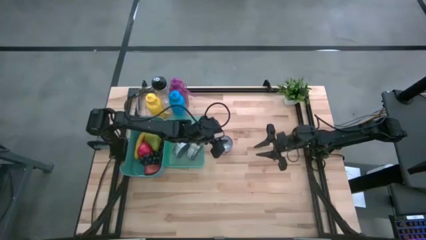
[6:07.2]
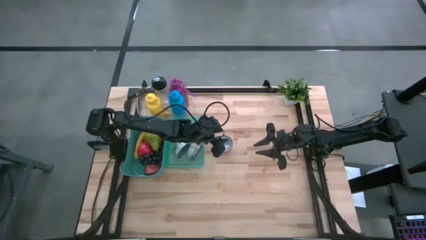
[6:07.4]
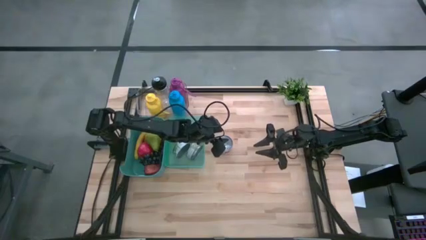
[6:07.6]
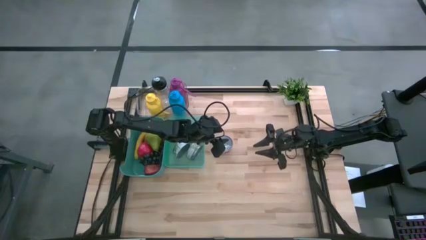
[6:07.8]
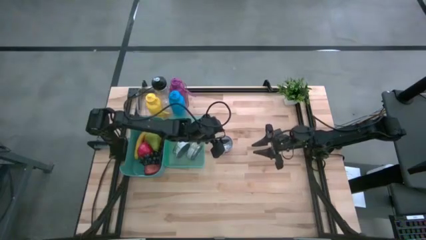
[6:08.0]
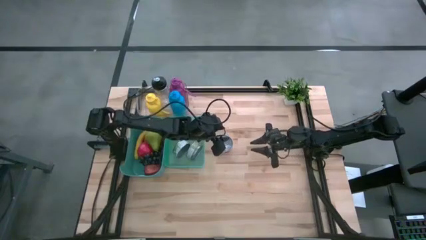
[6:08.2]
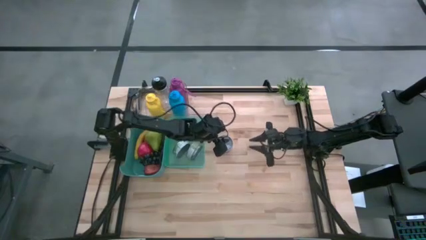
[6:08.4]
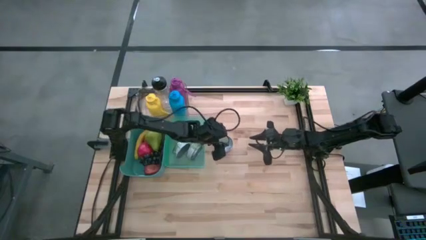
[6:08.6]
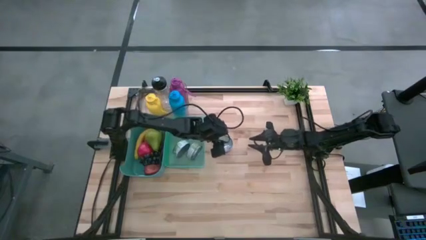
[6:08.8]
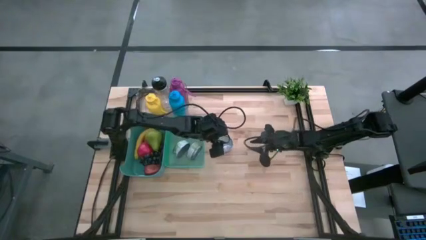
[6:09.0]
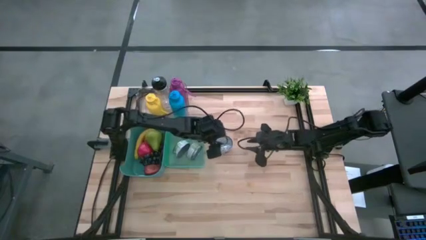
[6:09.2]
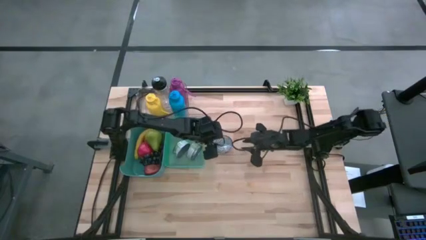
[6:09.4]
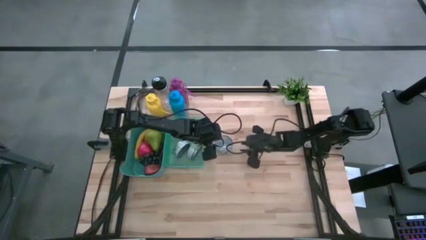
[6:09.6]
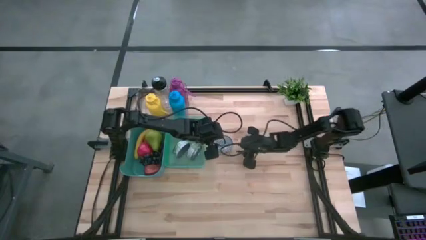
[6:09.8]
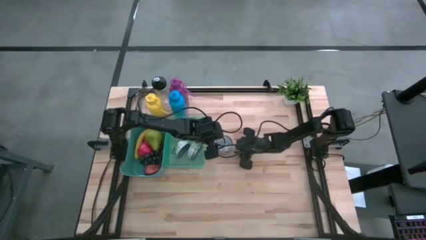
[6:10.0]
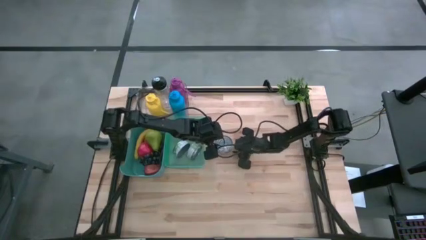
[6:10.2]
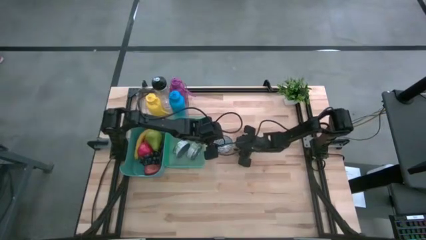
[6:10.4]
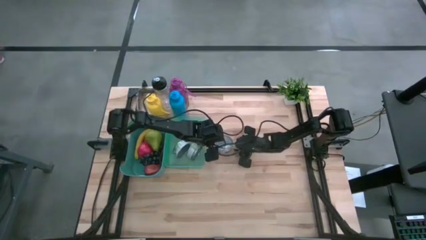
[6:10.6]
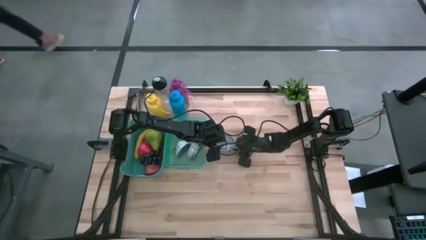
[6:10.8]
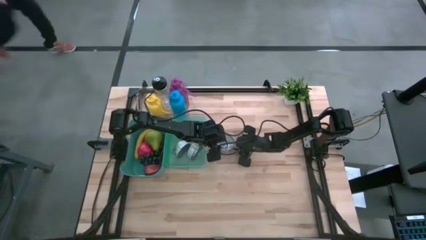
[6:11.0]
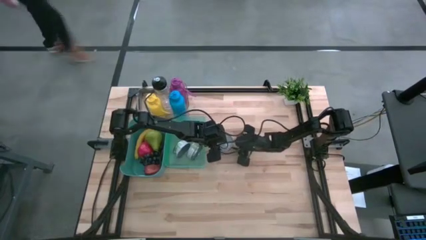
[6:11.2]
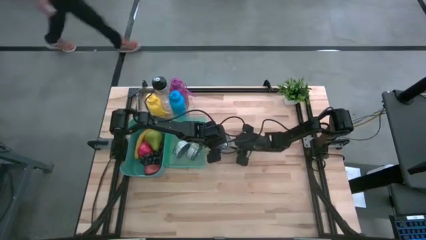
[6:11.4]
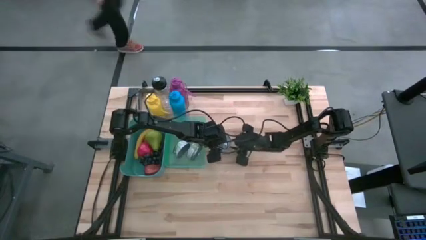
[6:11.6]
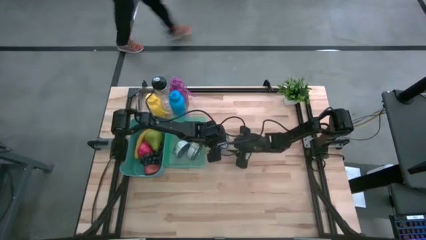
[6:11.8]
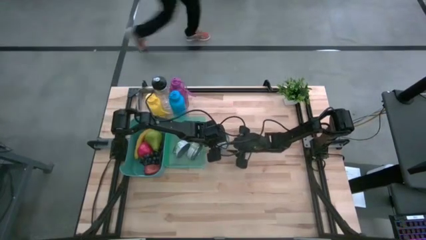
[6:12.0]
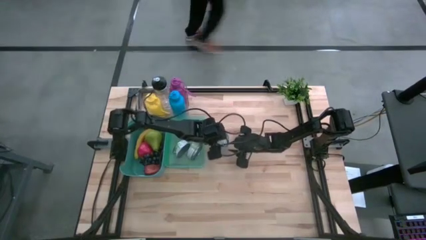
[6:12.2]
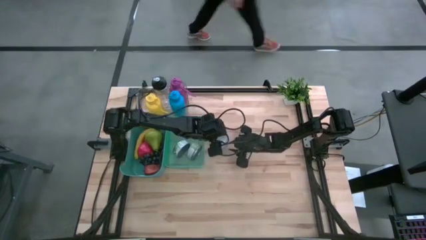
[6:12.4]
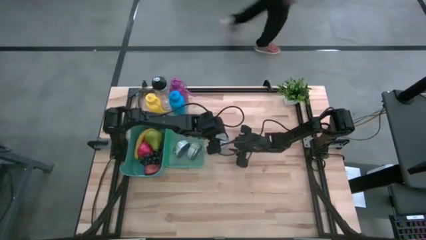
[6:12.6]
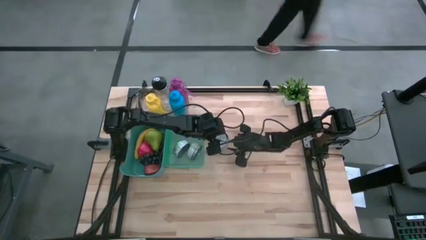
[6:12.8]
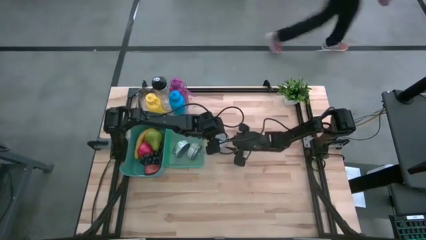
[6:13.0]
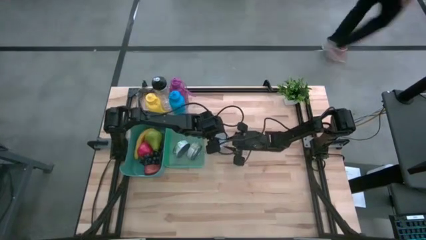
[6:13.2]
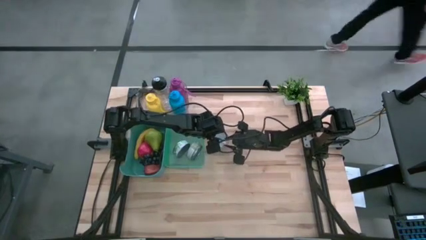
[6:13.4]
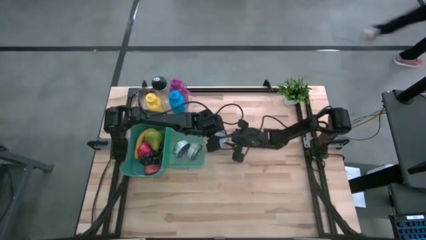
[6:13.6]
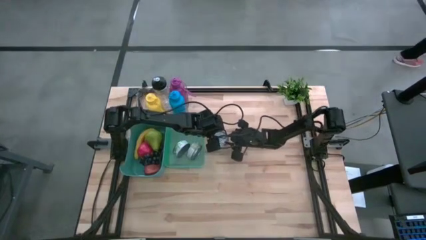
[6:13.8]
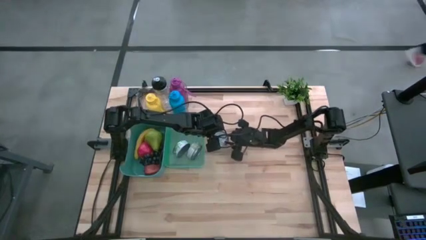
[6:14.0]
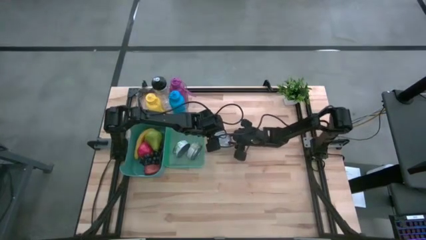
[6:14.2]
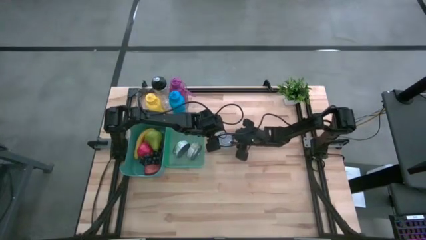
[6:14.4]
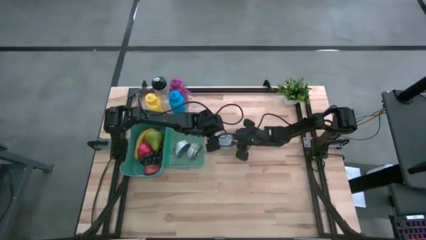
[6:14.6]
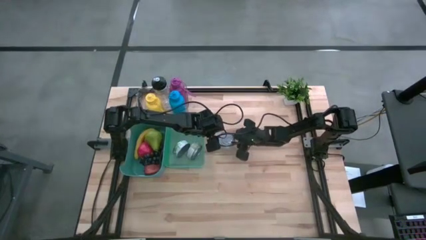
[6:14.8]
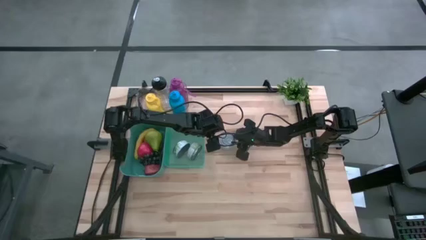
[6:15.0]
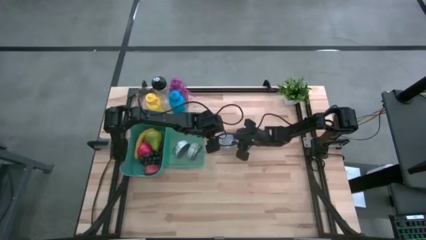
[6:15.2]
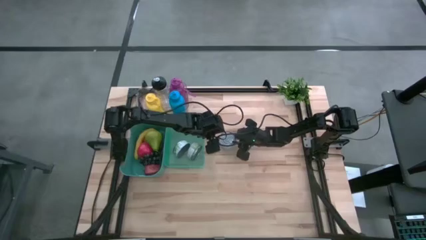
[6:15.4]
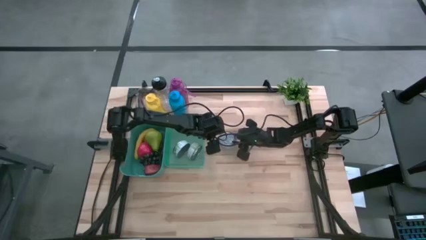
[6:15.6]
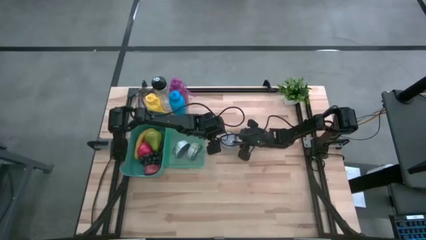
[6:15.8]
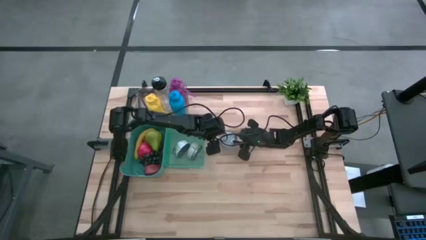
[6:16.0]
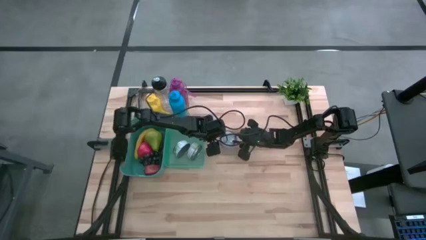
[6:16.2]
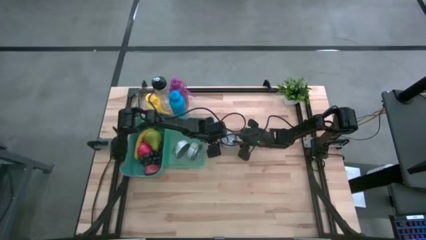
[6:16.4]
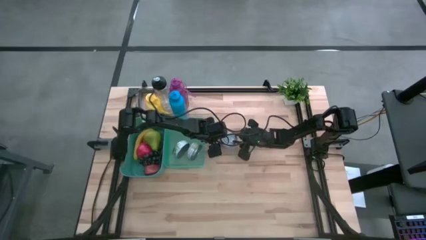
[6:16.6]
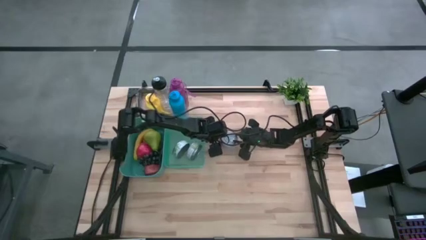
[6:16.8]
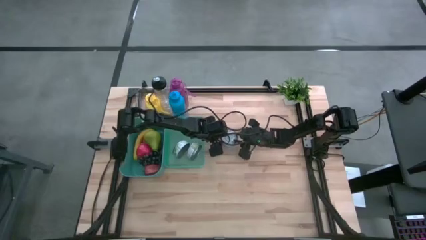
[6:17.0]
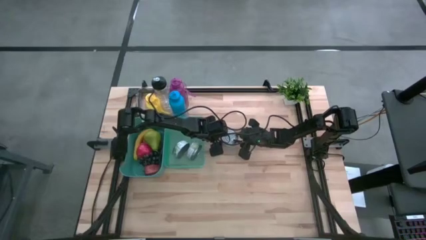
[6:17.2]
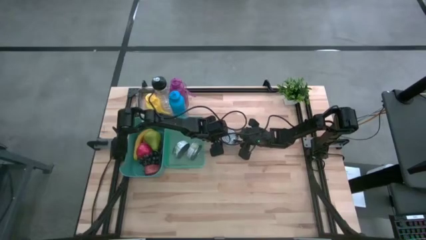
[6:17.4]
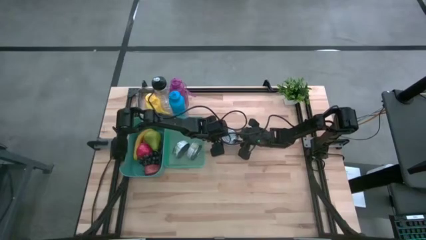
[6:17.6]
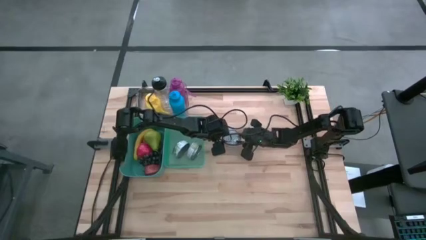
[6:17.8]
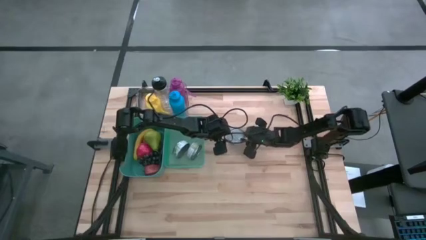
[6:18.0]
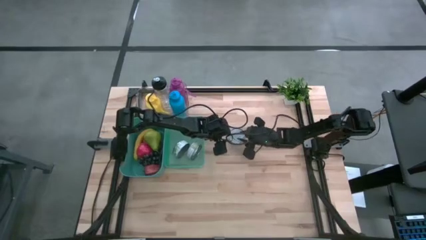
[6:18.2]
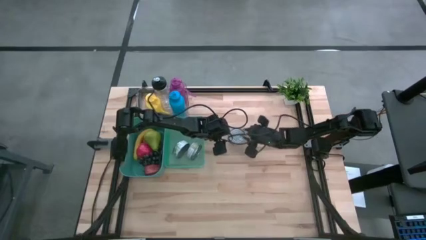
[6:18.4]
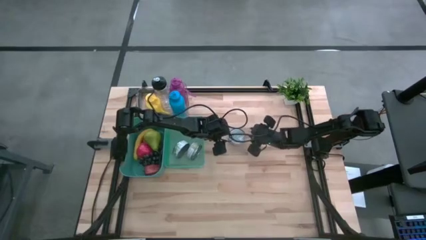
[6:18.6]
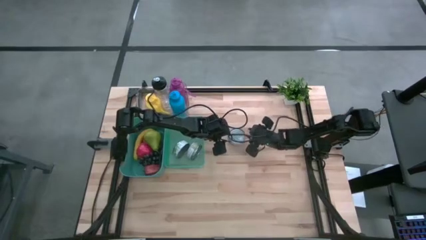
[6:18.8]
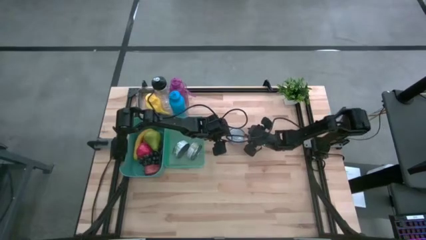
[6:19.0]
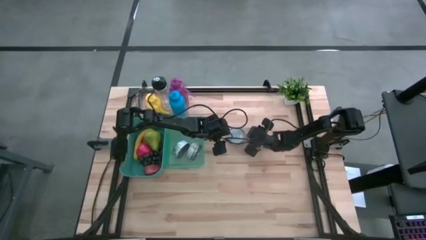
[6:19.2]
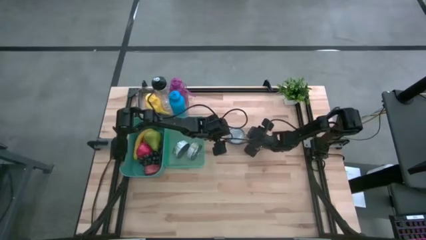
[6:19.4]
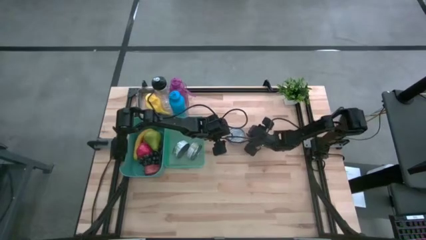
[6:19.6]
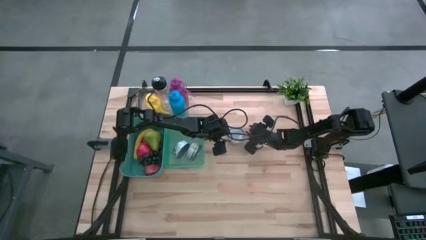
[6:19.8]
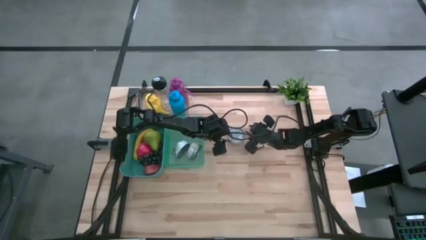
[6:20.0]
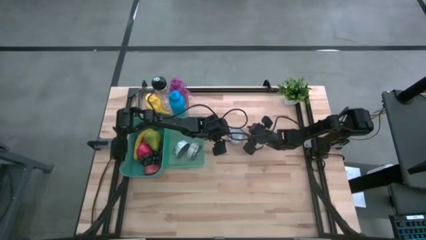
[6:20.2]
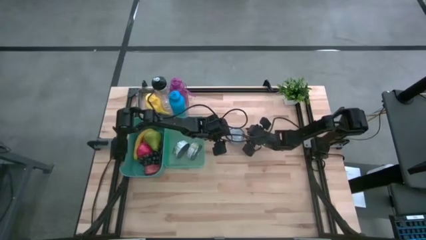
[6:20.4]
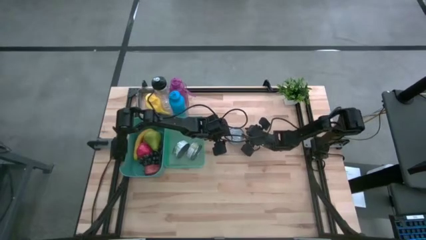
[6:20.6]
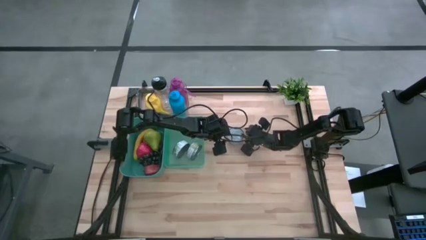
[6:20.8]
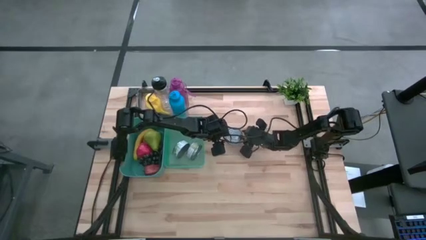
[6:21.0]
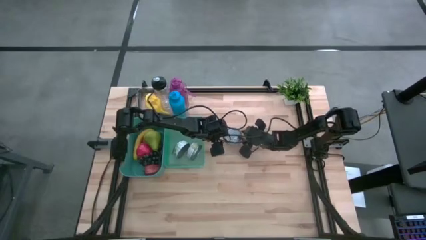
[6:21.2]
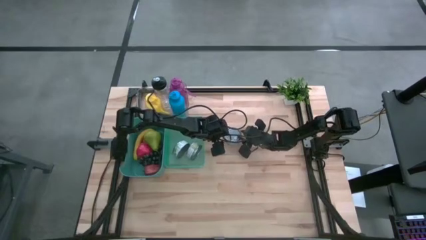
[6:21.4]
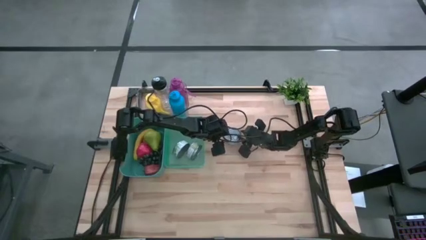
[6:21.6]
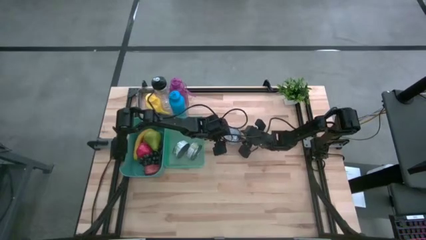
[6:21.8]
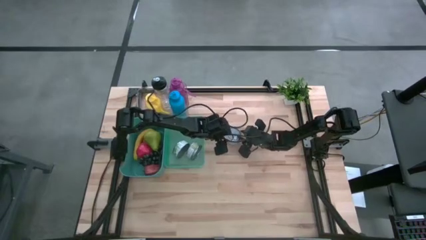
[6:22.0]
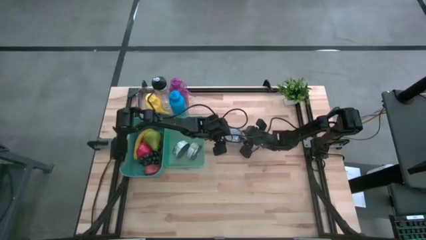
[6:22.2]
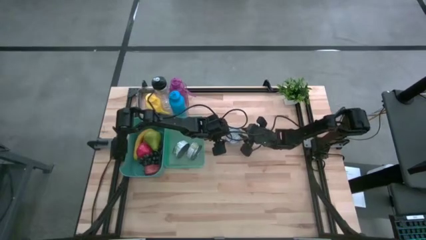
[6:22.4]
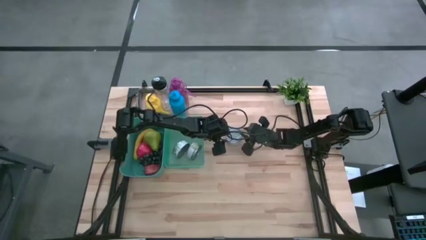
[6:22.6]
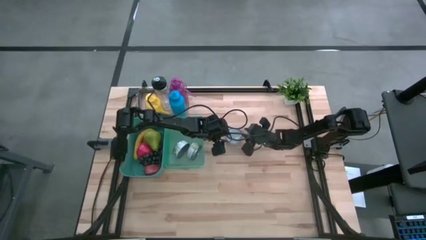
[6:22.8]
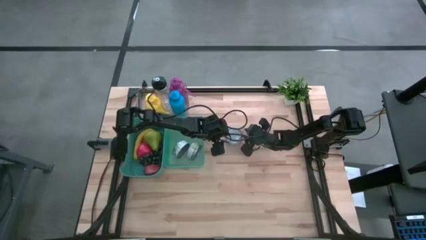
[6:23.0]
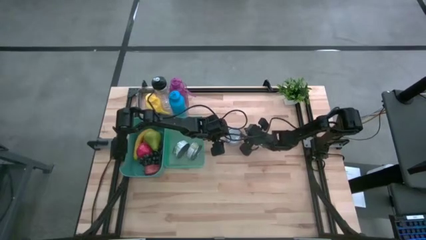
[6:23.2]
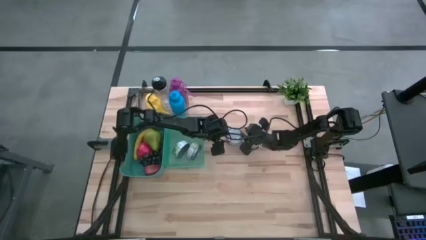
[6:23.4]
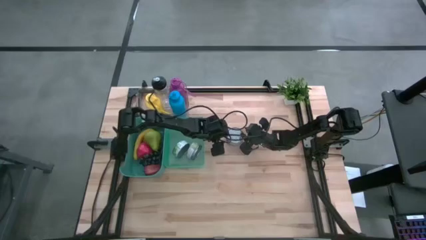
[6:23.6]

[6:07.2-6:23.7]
Task: Pick & Place Food Item
Put the red tuna can into the light green bin
